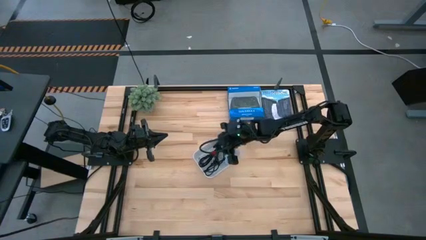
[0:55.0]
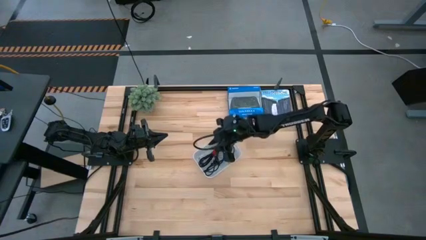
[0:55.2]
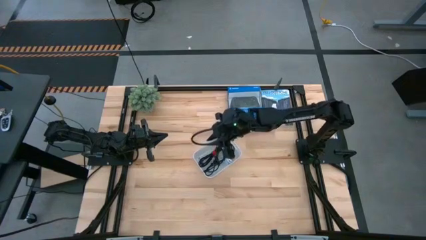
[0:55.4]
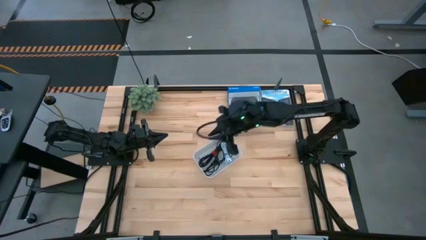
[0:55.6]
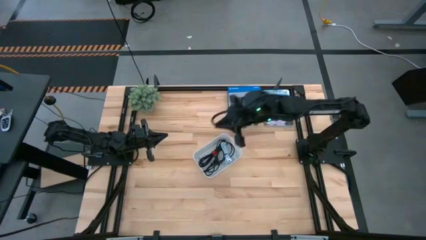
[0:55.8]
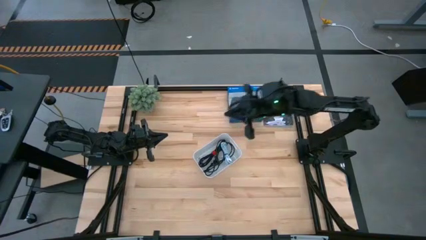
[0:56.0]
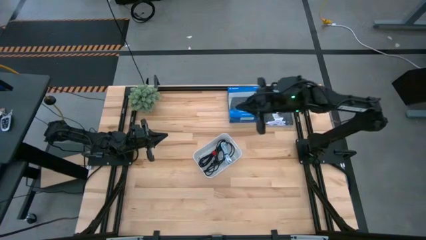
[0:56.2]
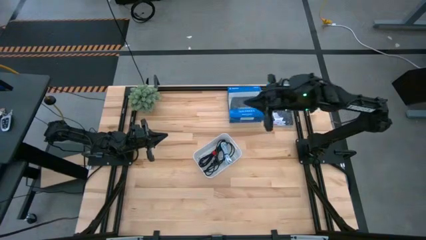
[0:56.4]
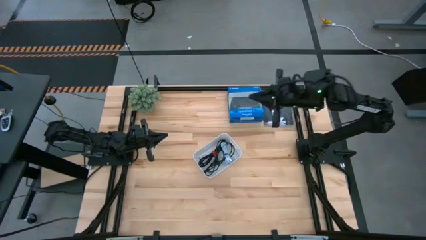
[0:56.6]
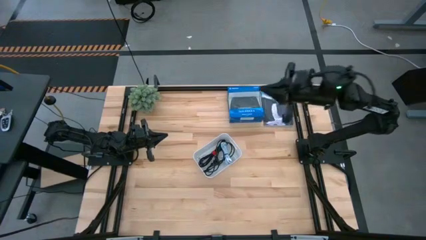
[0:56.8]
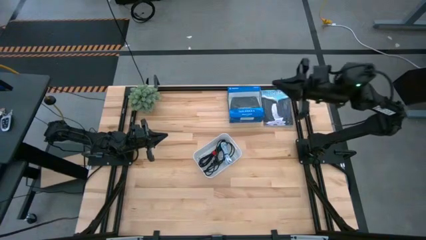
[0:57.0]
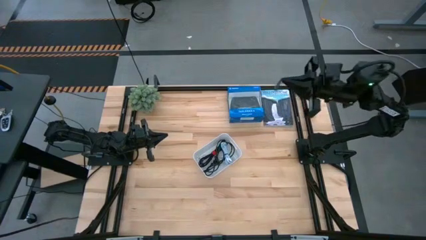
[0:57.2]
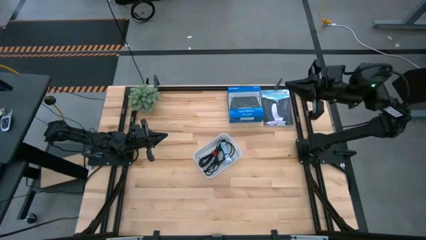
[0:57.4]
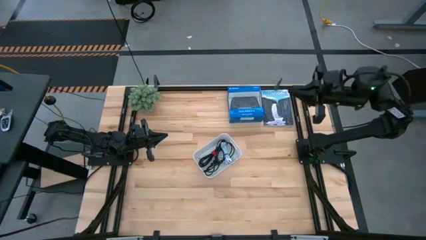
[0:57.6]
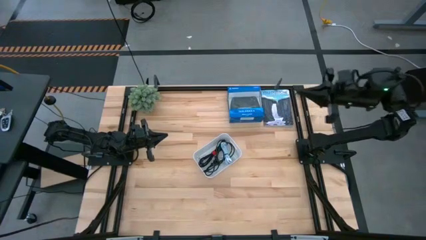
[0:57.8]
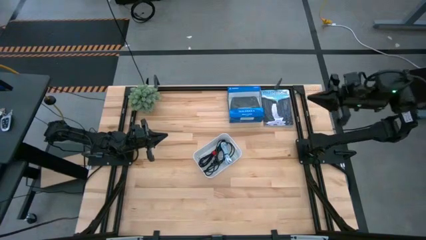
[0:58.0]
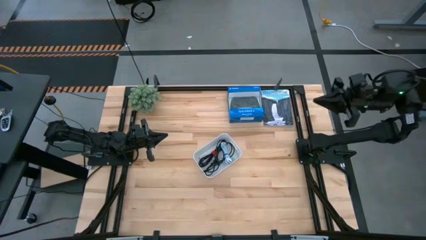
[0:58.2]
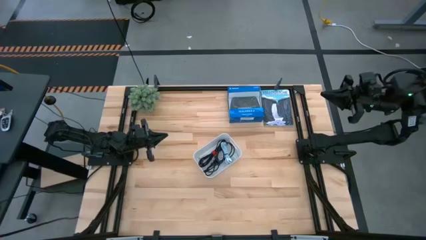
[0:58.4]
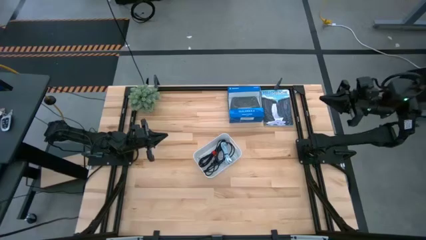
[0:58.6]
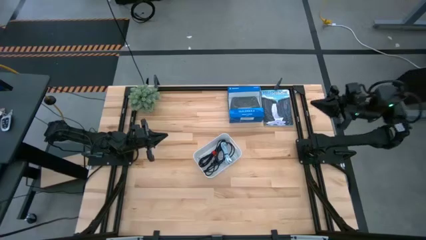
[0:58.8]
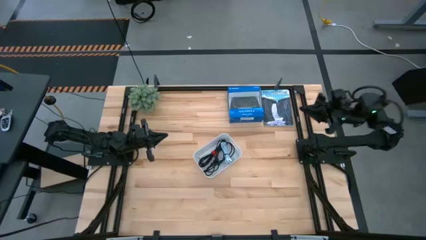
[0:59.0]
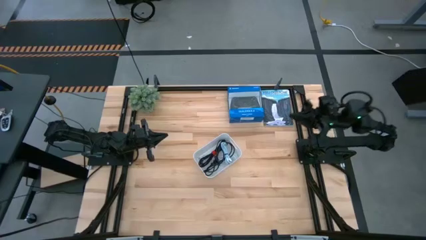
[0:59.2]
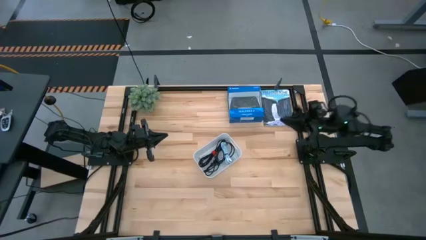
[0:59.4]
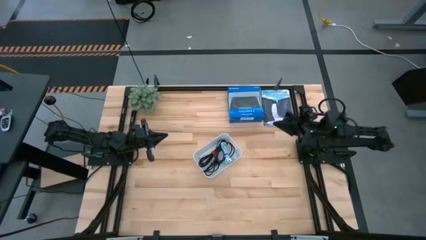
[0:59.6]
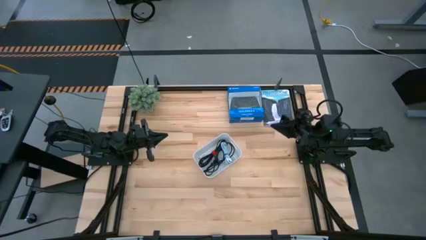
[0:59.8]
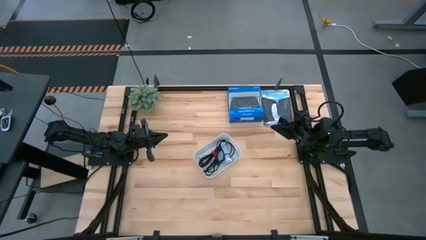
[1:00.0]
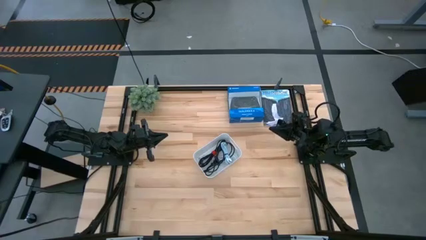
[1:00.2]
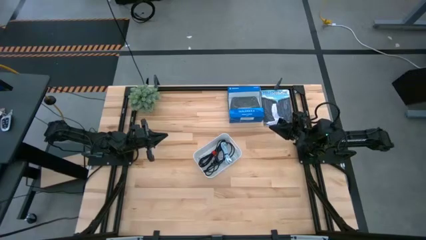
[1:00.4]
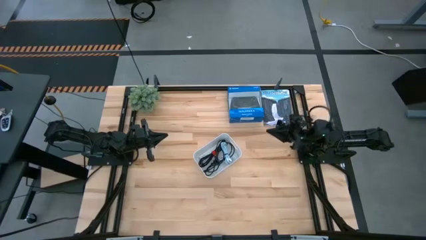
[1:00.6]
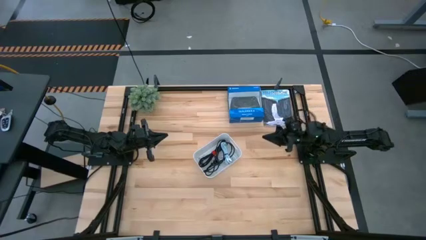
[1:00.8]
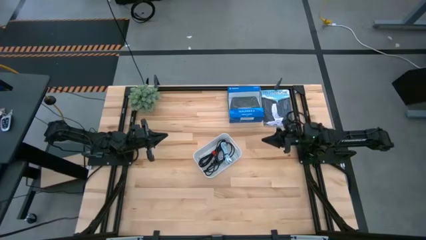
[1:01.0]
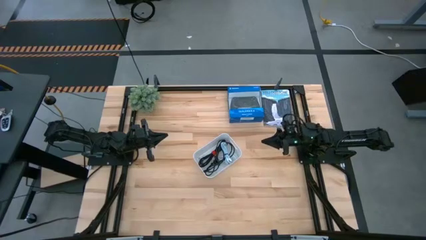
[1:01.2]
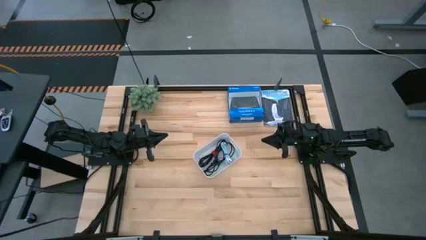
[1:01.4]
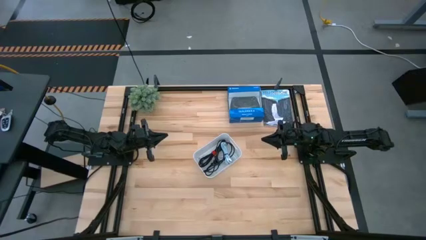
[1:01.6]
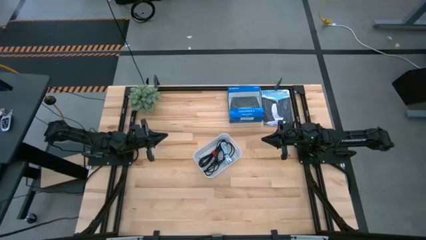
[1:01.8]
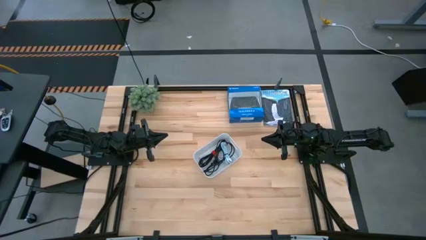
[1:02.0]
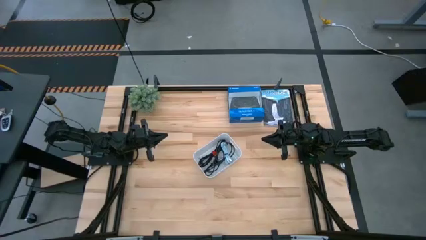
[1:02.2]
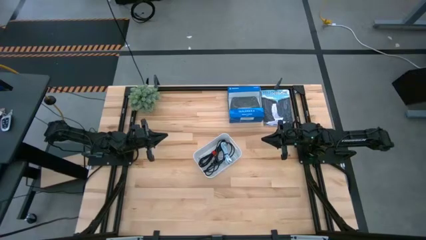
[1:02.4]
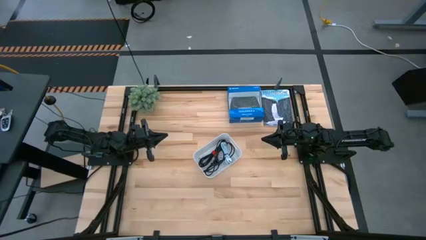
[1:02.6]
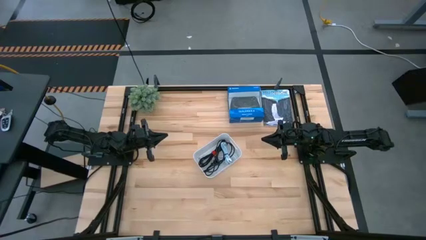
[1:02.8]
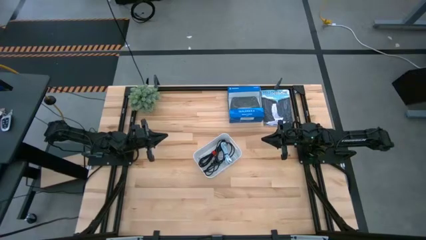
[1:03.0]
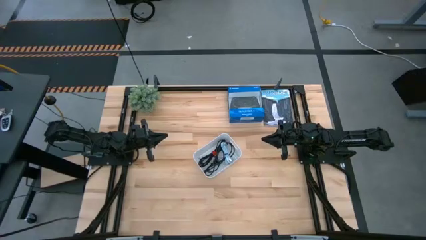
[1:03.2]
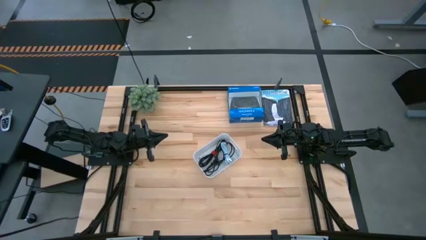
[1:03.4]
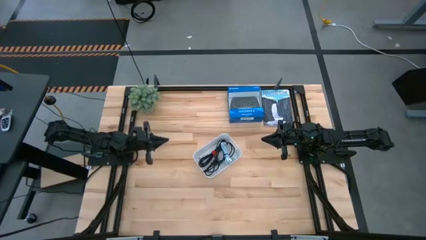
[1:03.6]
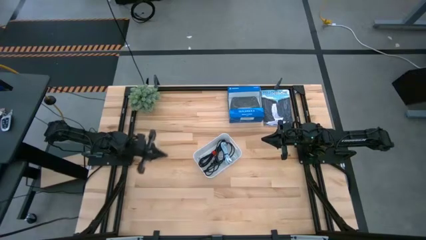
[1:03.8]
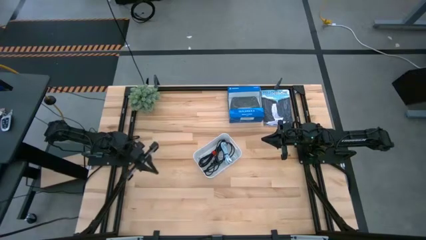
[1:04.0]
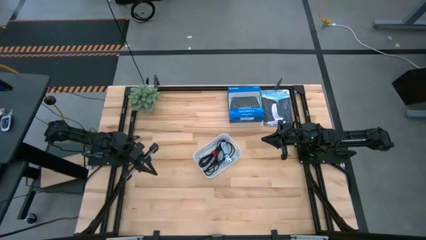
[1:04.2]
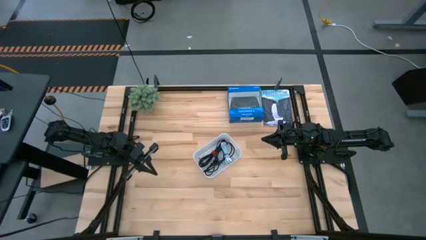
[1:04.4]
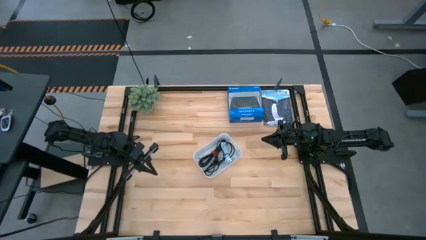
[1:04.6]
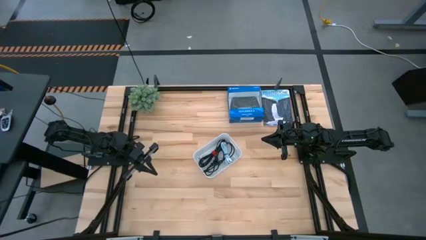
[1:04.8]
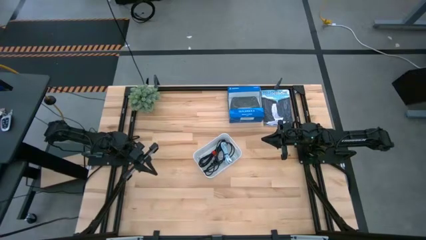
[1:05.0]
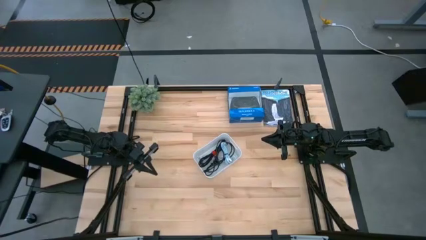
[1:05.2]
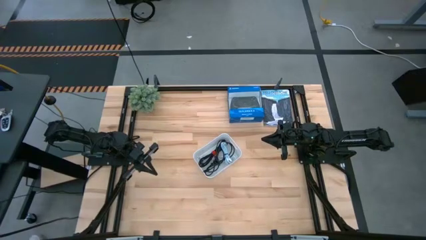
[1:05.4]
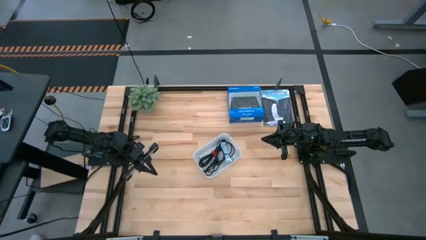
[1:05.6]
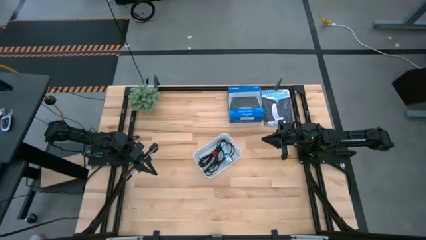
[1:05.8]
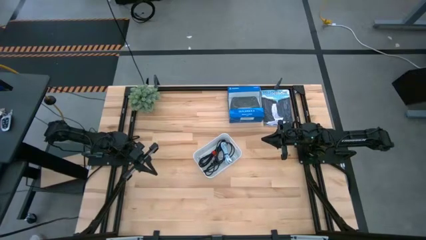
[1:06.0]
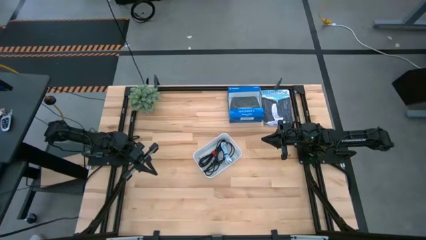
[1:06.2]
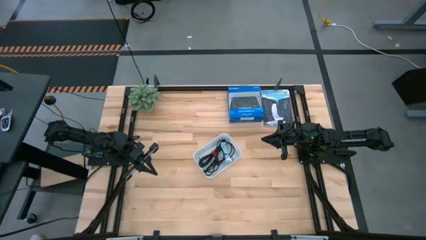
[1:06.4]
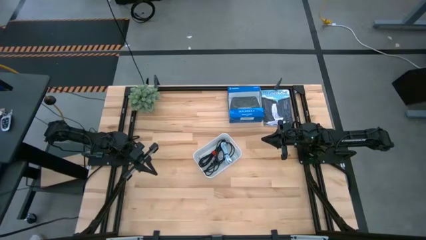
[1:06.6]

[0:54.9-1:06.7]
Task: Pick and place USB-C Cables
Return to Home Position
